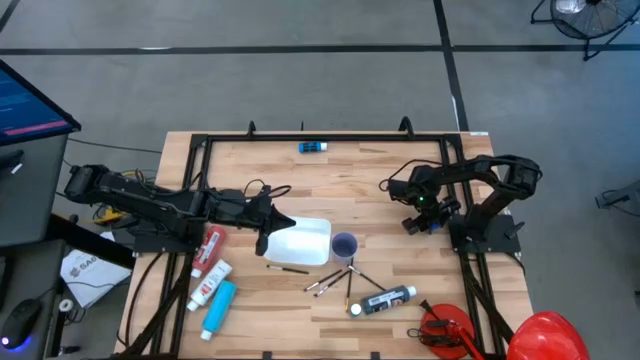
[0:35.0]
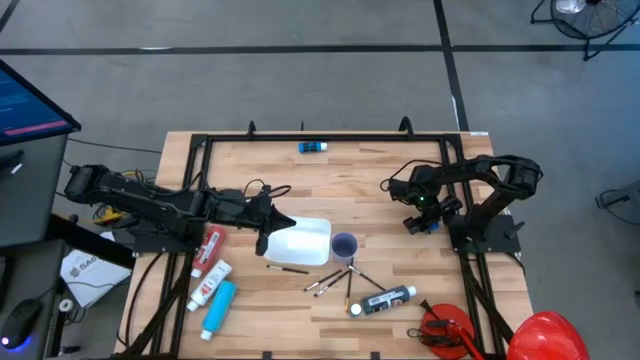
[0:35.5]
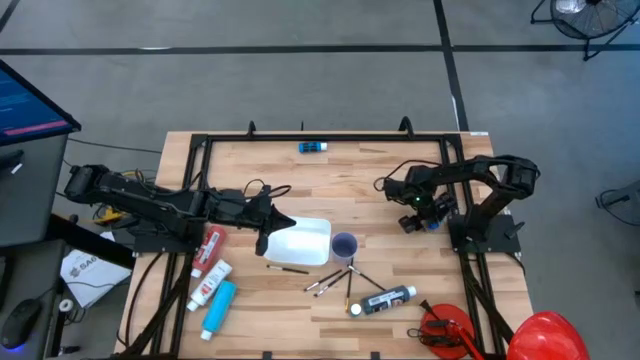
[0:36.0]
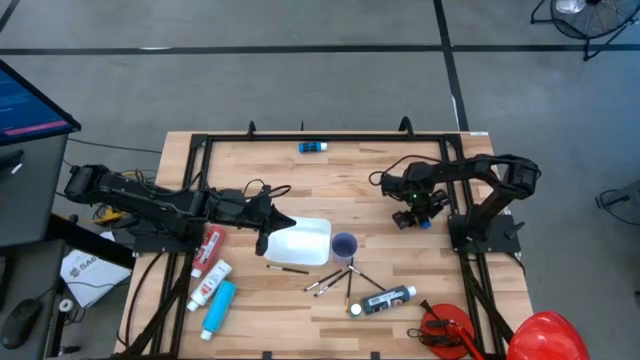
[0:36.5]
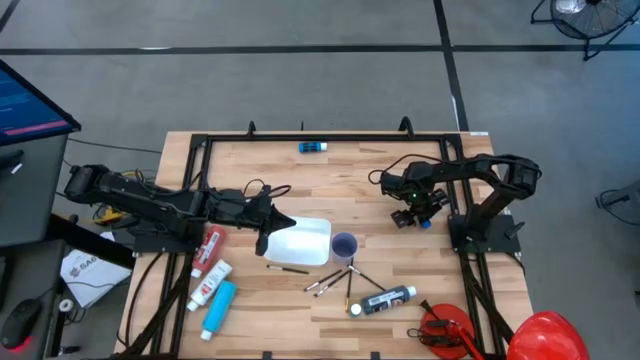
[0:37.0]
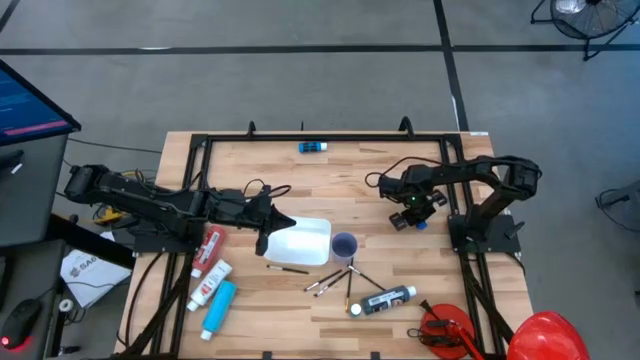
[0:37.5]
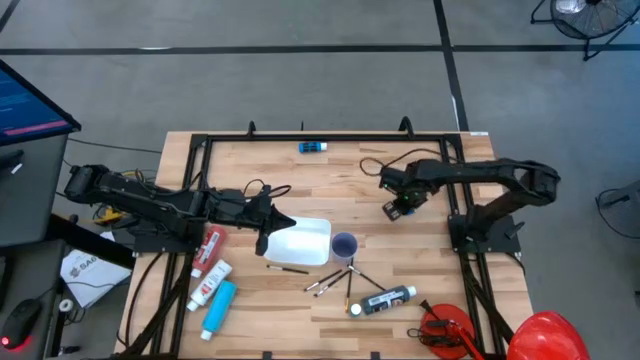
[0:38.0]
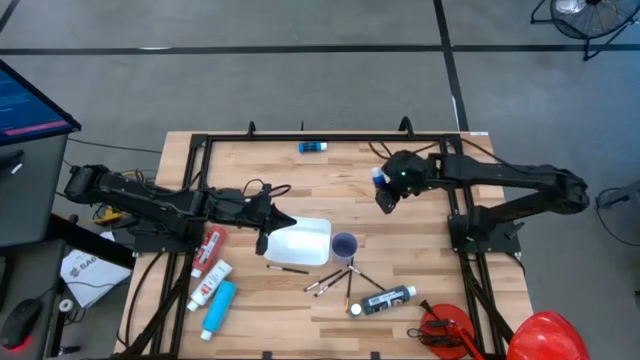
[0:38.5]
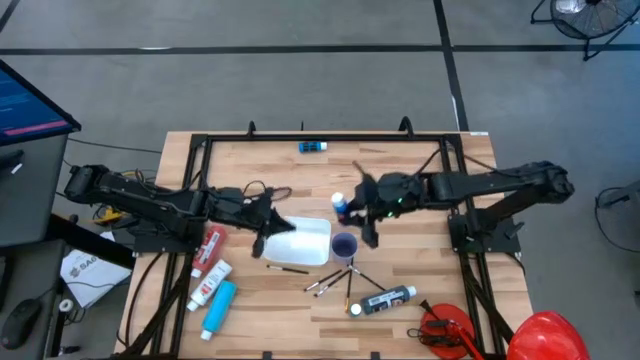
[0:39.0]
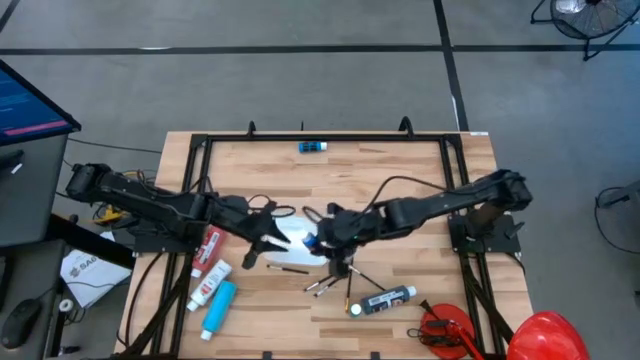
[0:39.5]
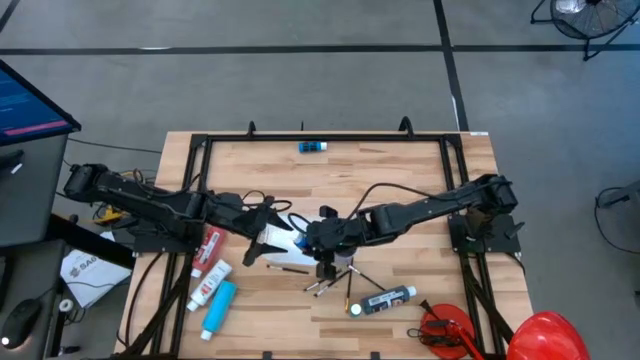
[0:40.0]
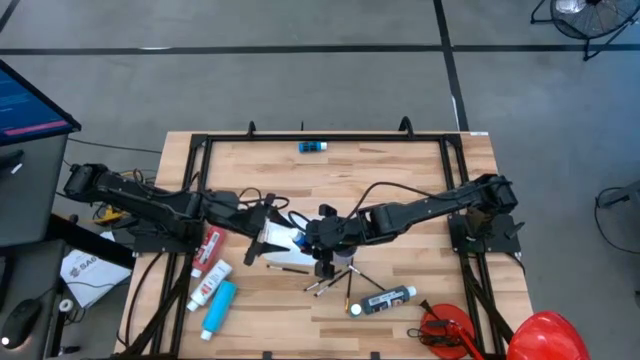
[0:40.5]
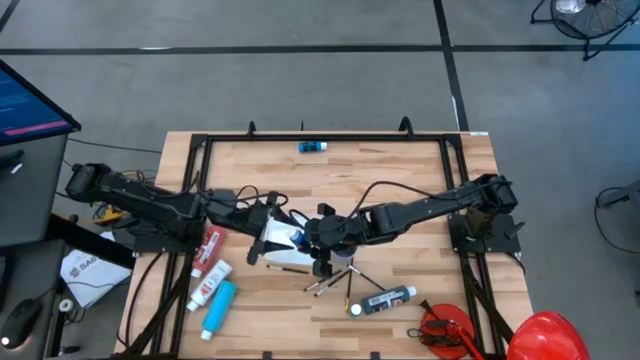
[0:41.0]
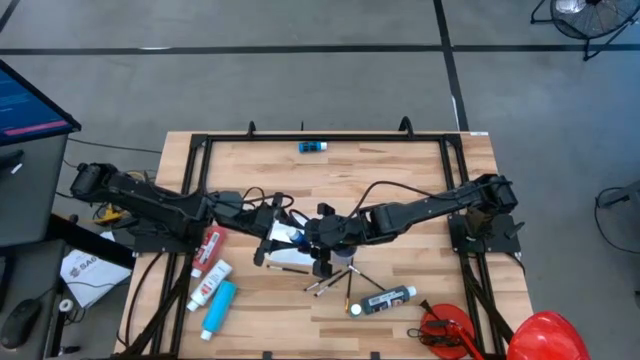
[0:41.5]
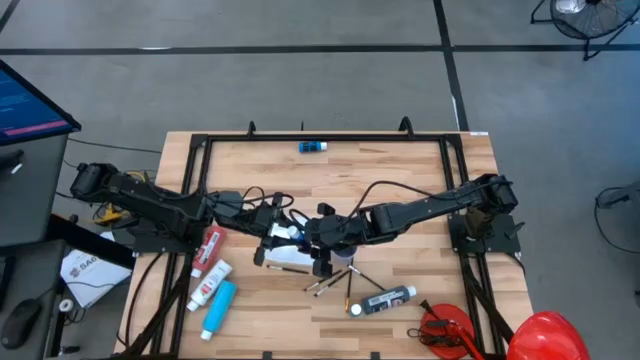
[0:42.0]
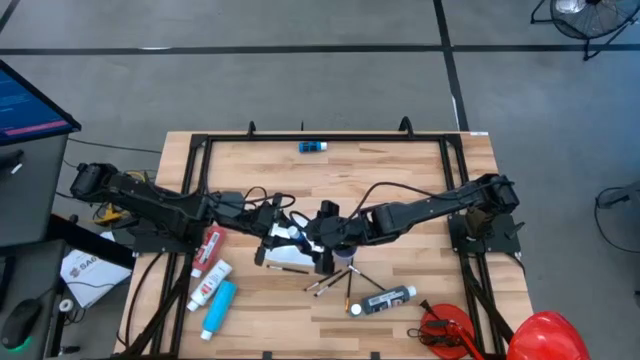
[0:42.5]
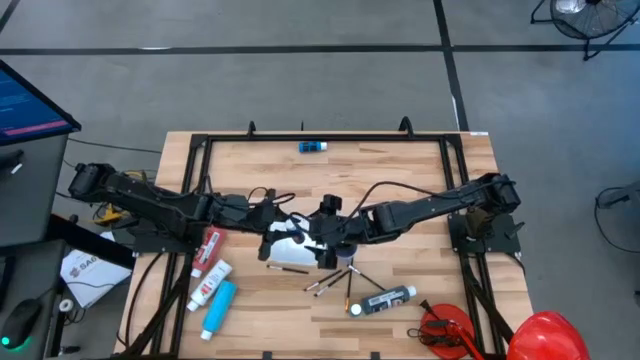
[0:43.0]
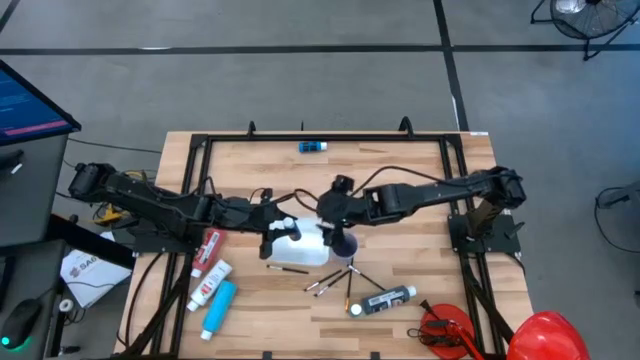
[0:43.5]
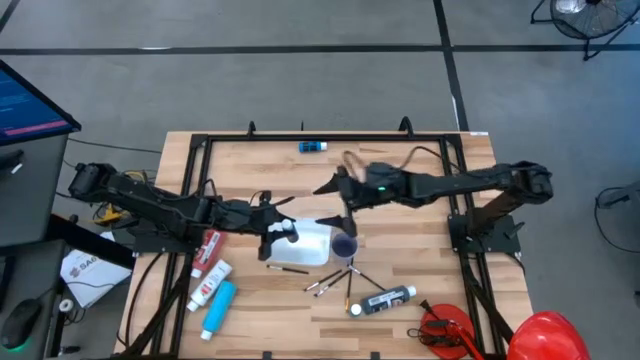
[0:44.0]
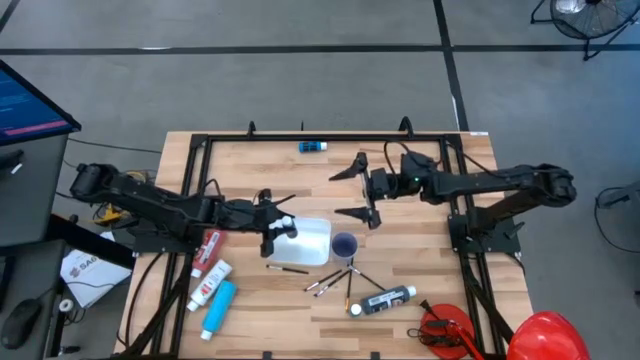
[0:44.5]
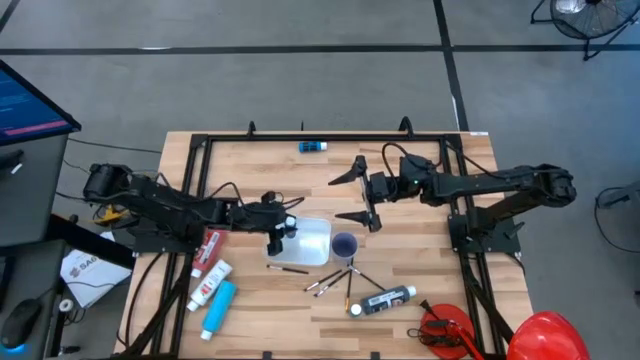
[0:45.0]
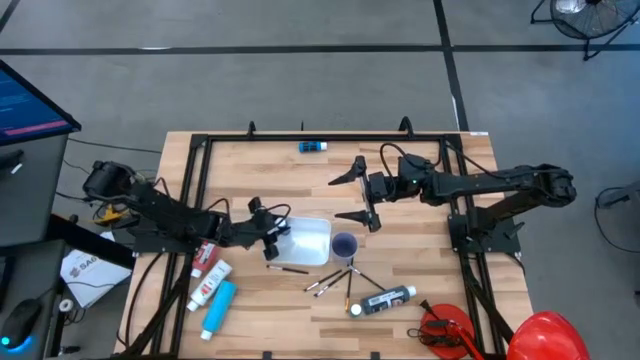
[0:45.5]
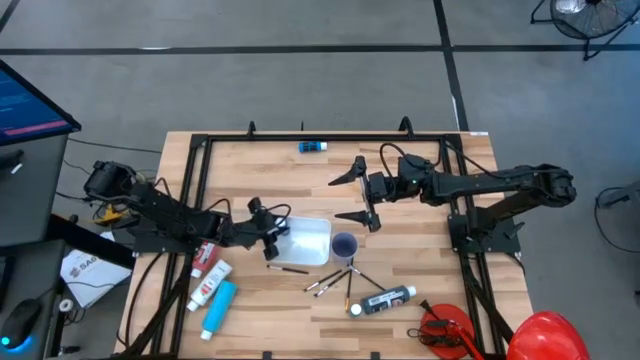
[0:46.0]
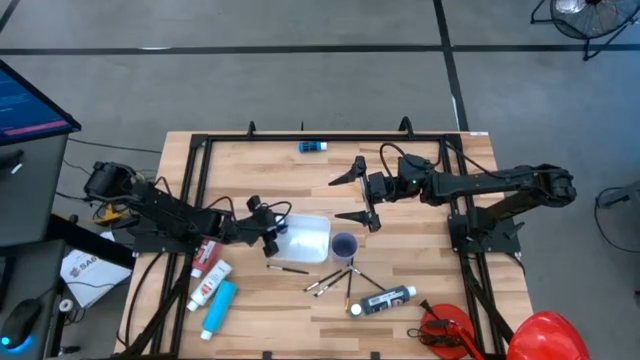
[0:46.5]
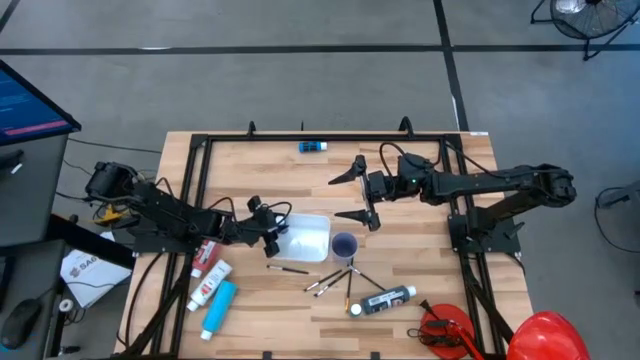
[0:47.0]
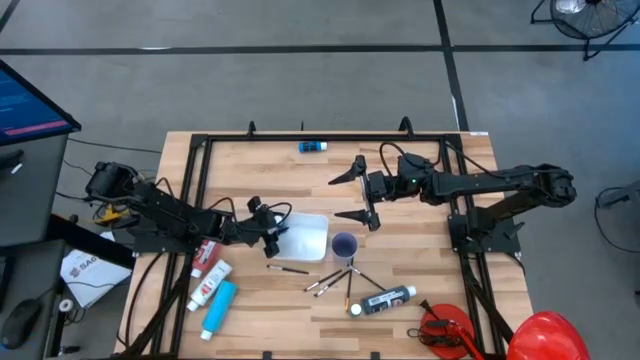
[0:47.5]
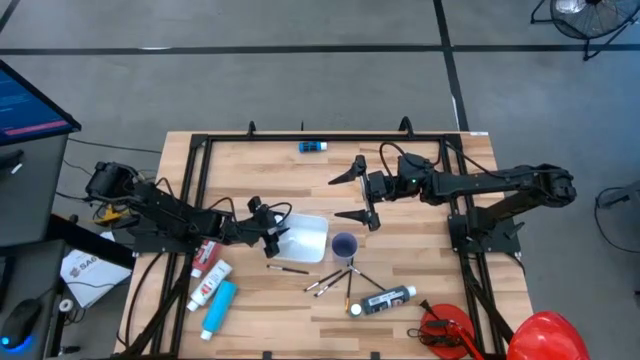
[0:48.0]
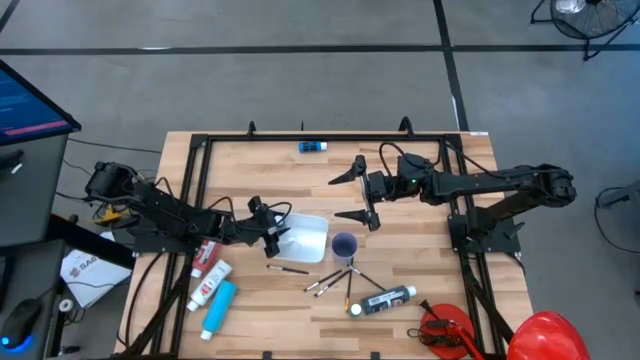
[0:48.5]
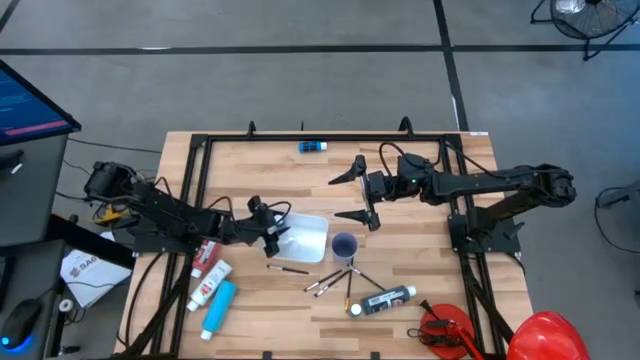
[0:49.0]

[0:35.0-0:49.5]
Task: Pick & Place Paint Supplies
Put the blue paint bottle into the white bin

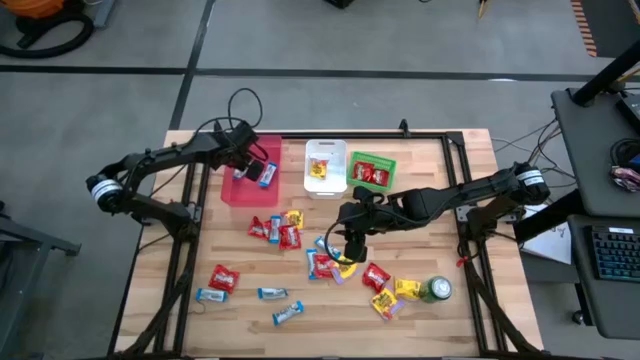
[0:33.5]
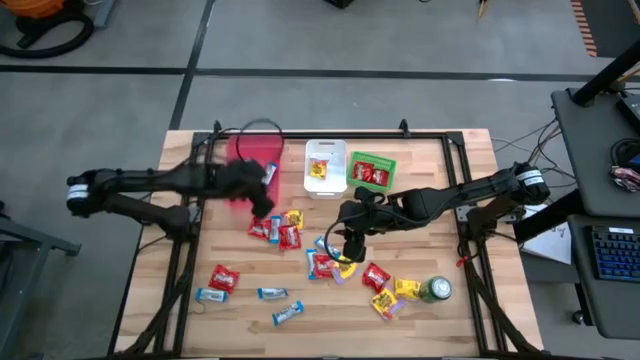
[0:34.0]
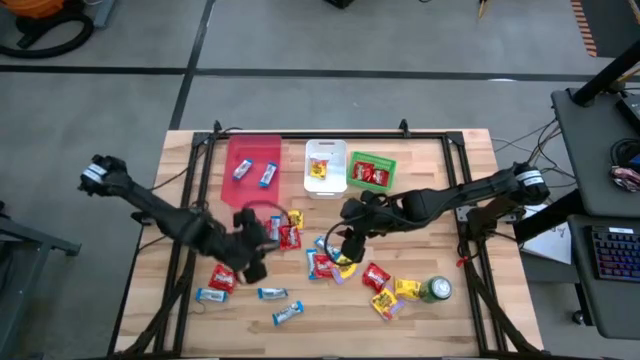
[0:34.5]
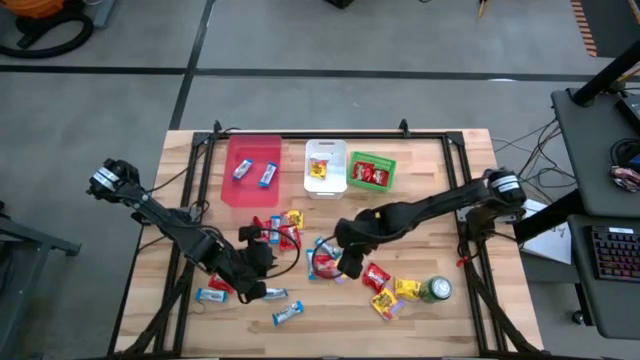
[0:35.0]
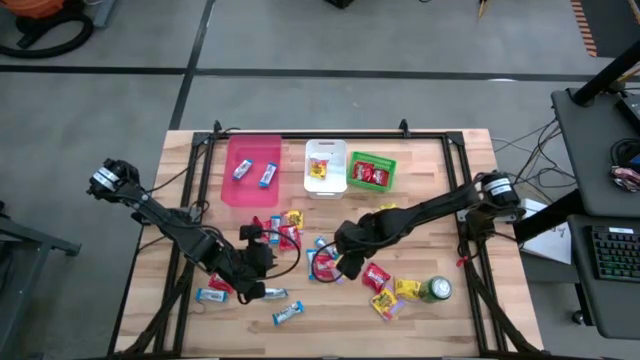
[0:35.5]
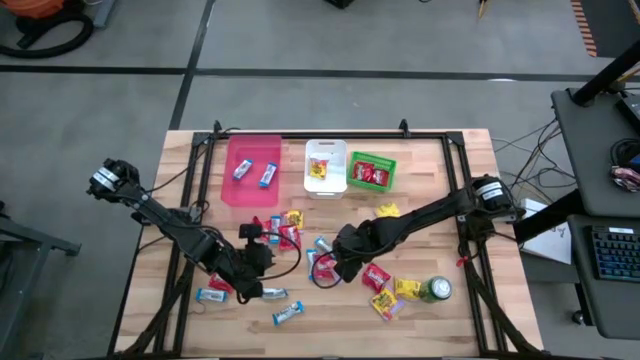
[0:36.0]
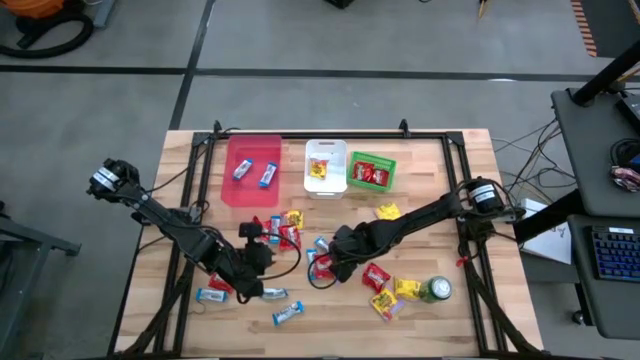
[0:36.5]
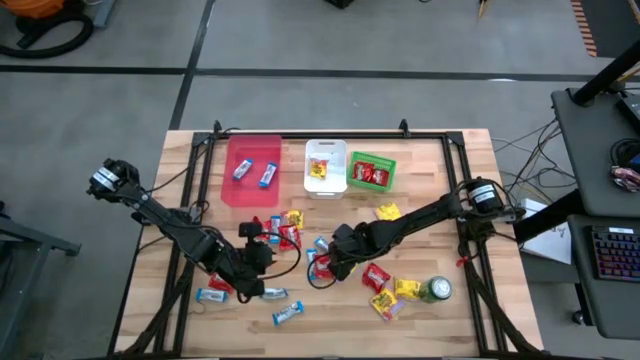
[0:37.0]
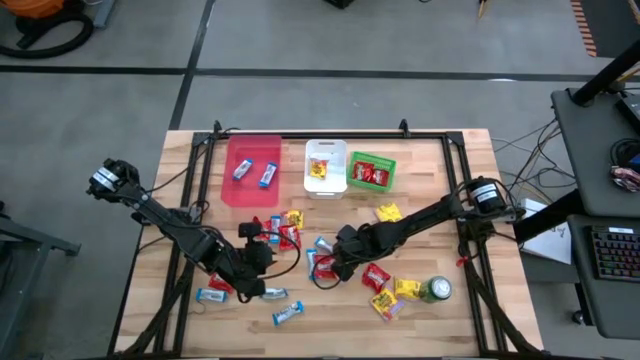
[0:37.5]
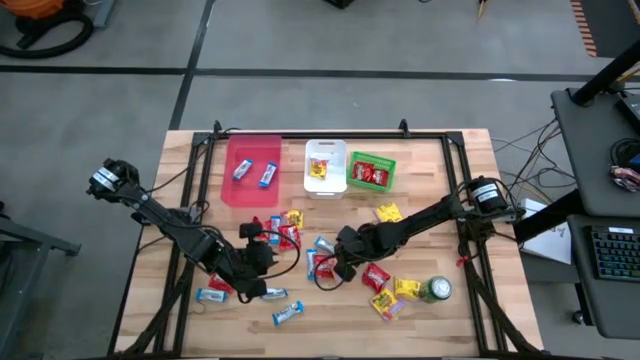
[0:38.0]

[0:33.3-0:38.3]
Task: Sort candy
Put the yellow candy into the white bin
